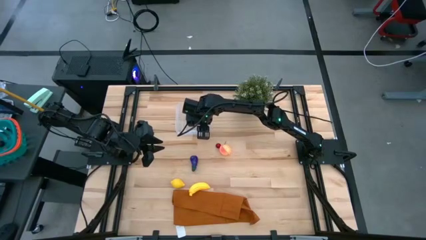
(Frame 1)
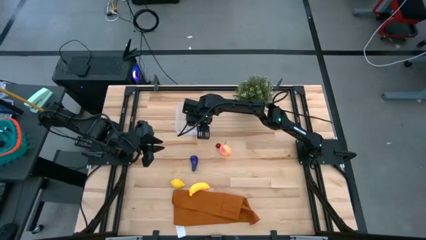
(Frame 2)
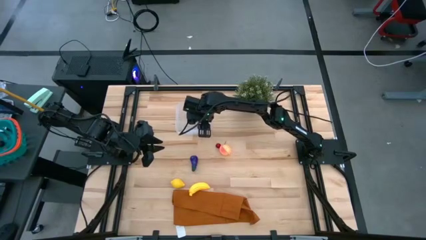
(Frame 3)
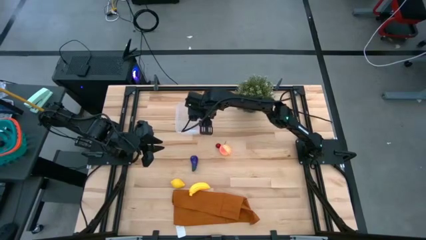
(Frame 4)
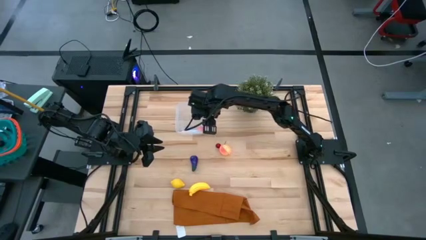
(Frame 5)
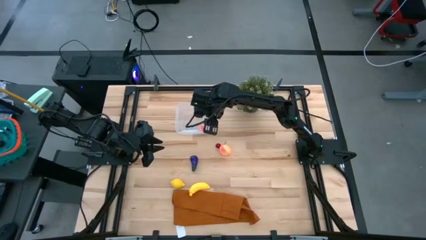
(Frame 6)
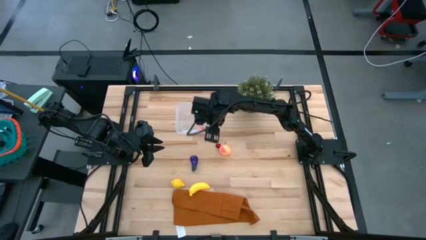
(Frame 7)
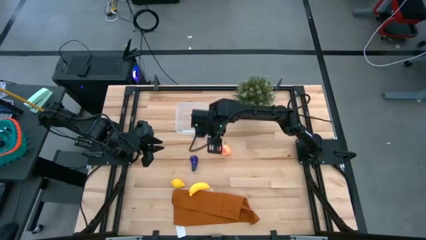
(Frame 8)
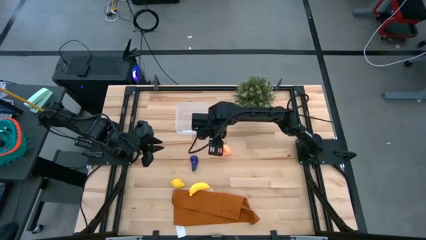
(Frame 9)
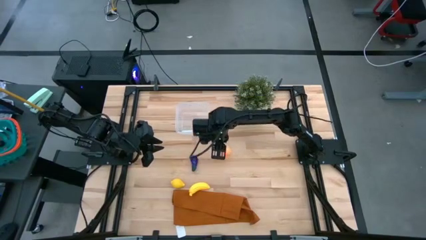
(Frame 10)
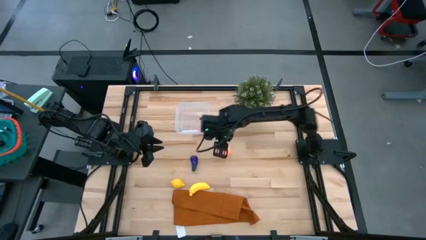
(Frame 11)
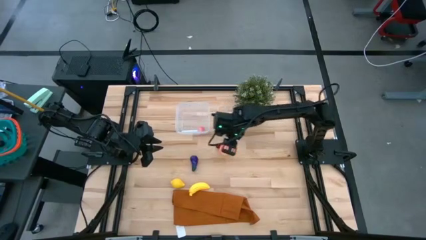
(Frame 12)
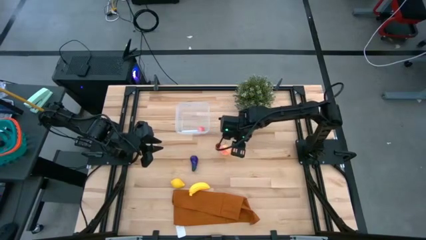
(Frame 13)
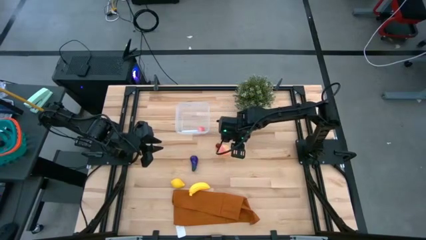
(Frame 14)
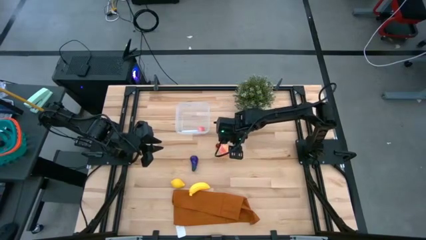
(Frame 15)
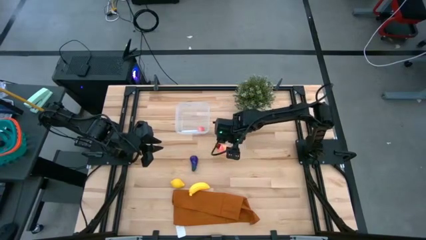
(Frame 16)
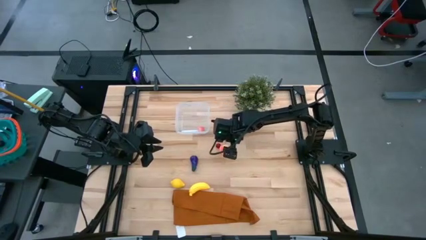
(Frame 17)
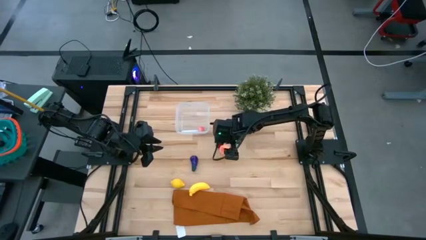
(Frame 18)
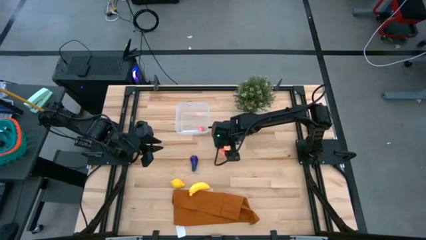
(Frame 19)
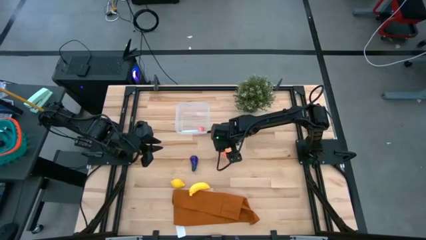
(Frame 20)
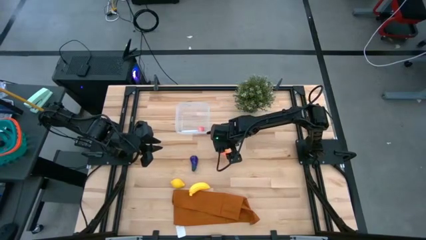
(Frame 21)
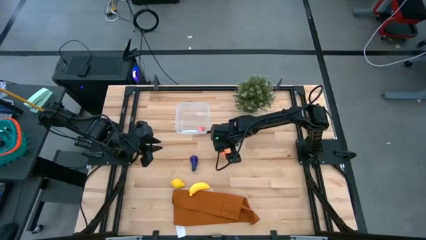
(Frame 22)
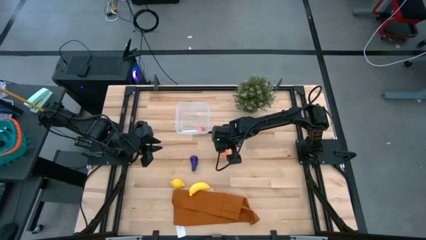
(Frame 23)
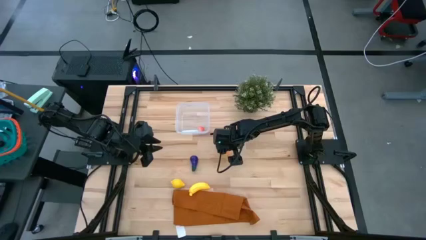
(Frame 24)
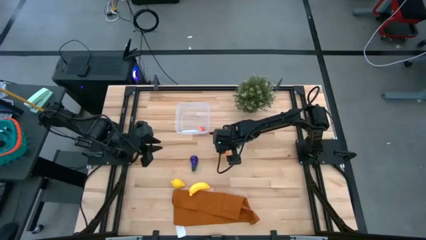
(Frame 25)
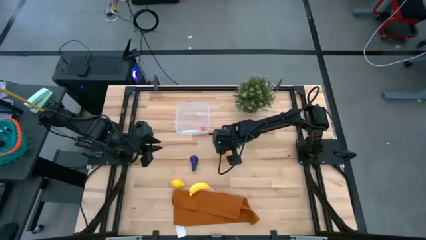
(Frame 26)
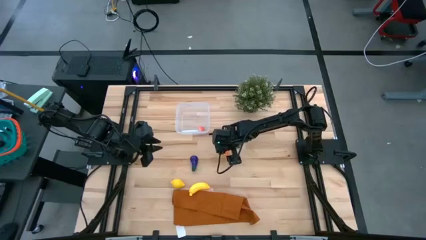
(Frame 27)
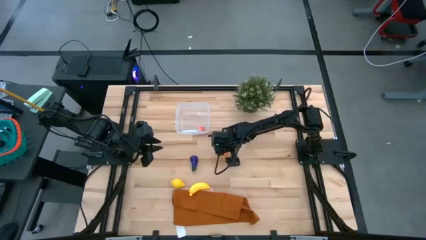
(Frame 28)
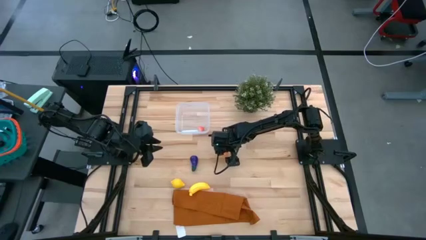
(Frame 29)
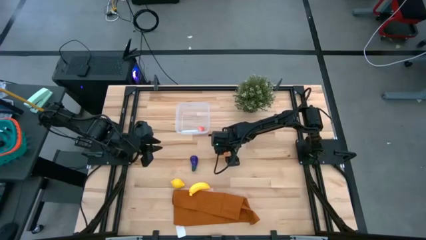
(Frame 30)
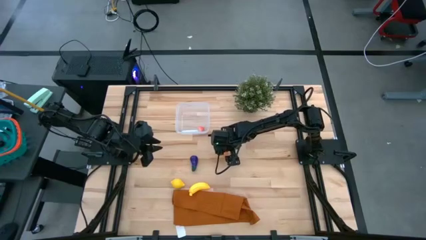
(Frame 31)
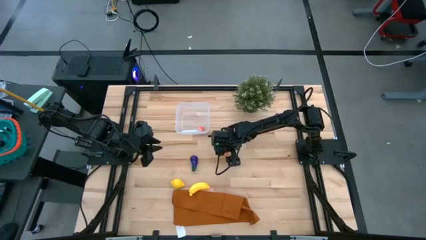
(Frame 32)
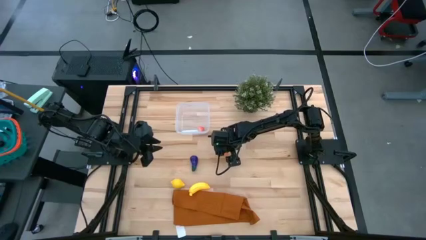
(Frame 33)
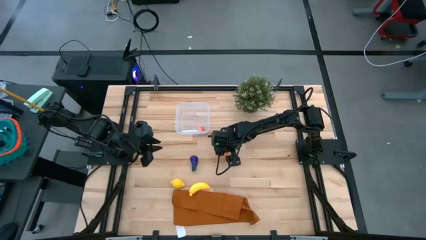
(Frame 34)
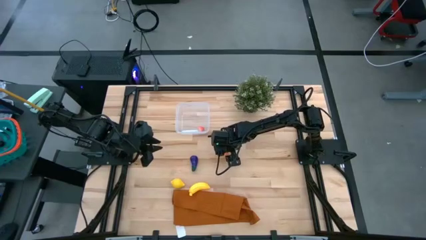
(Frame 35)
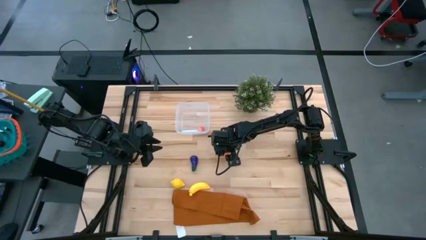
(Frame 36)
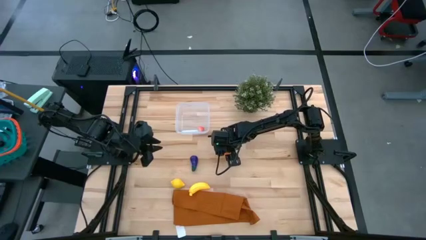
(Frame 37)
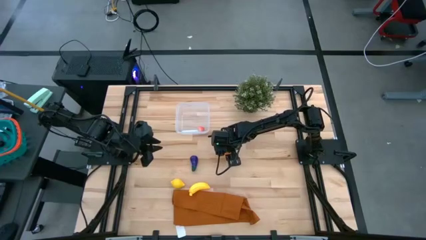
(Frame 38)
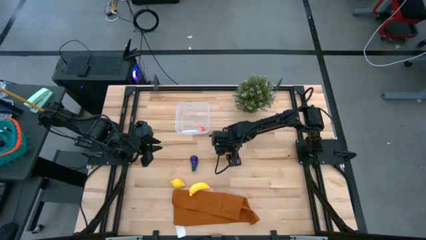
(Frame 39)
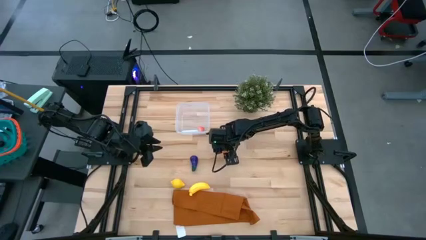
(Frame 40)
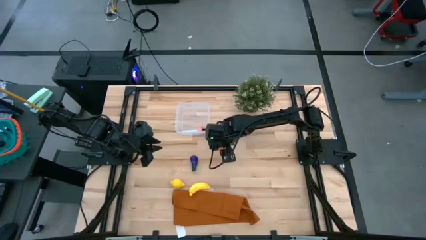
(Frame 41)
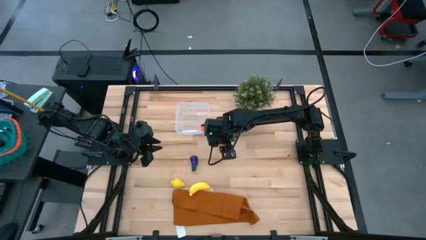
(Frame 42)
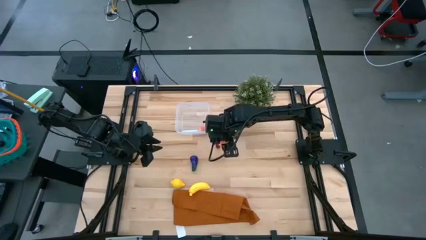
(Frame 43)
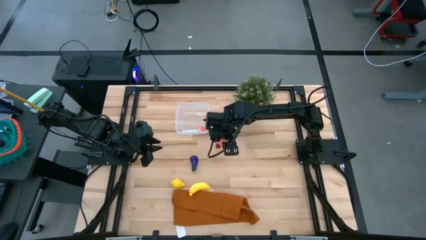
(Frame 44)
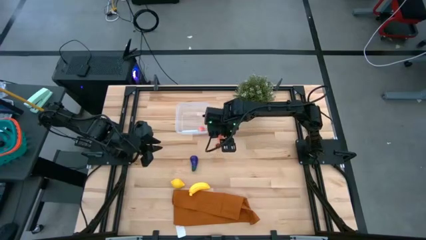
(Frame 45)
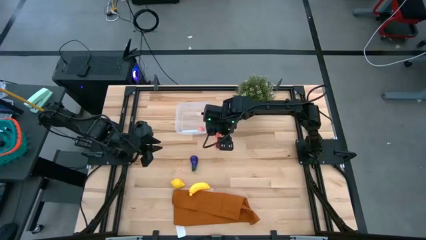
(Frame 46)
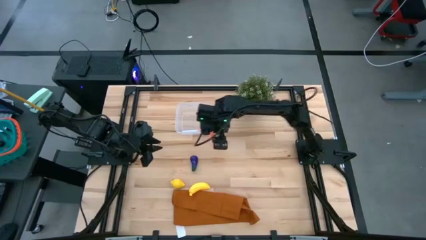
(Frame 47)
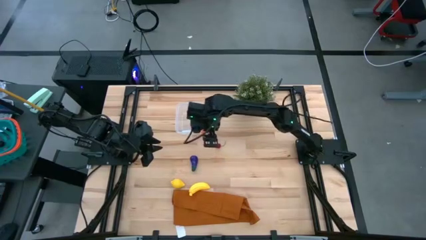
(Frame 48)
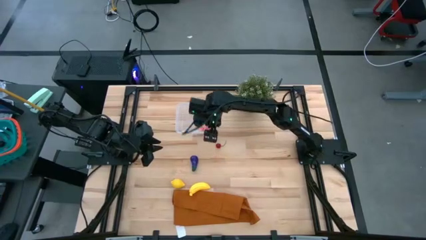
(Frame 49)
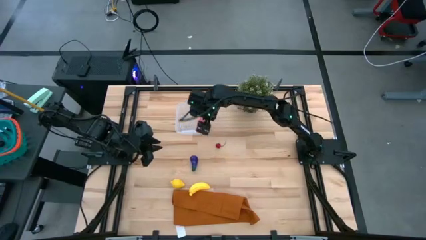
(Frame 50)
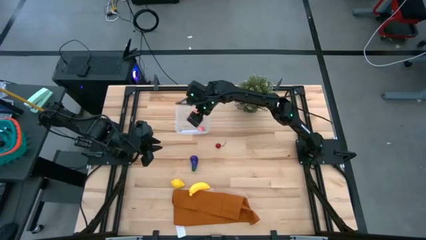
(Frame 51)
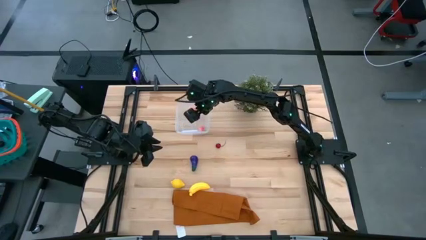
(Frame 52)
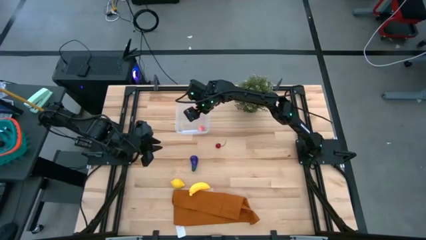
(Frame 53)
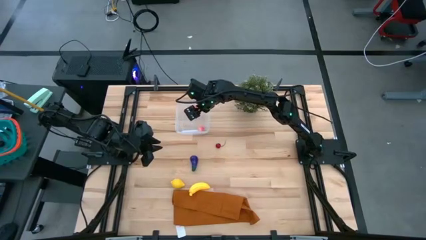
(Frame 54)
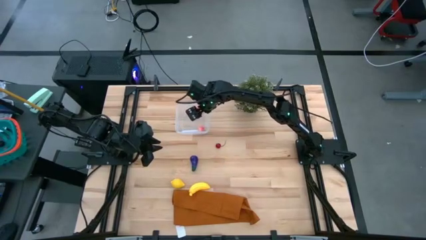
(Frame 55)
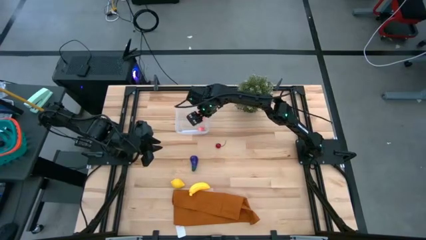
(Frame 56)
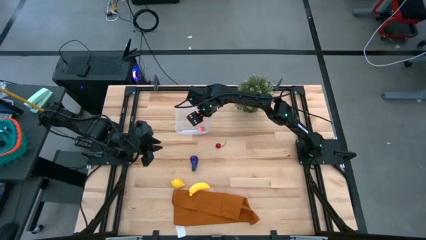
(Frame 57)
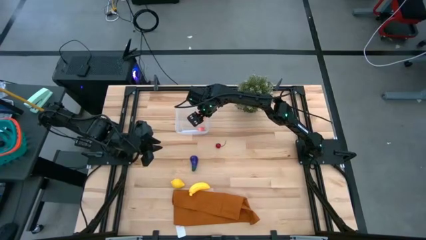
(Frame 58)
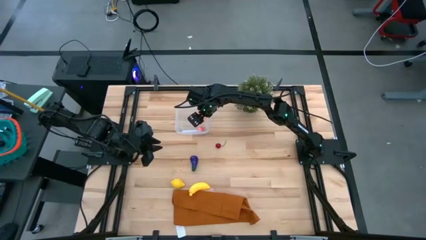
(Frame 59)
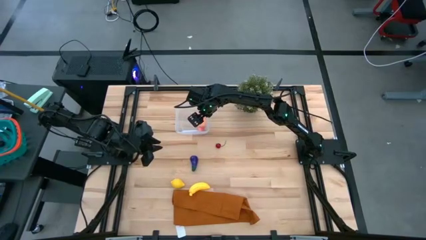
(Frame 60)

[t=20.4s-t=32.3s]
Task: Pick and placing Produce into tupperware
Put the peach into the container

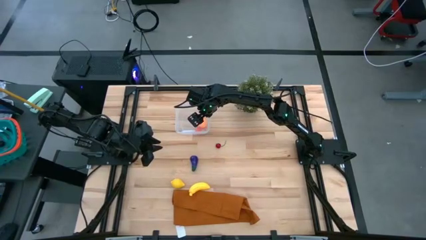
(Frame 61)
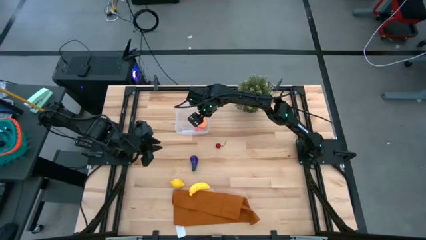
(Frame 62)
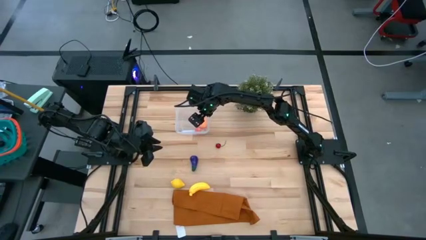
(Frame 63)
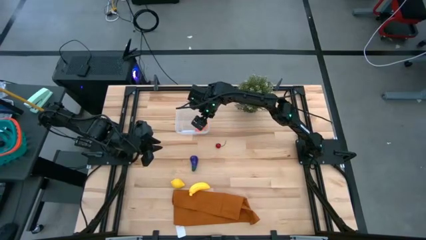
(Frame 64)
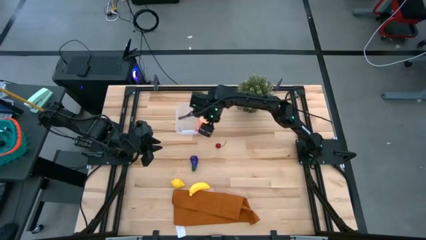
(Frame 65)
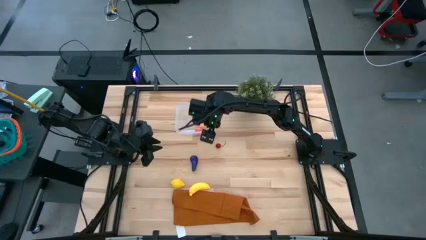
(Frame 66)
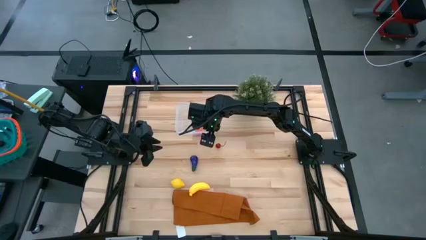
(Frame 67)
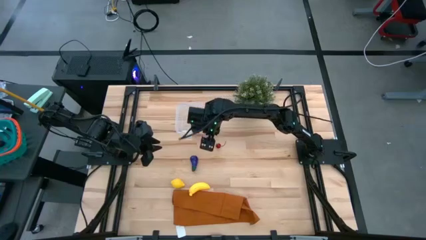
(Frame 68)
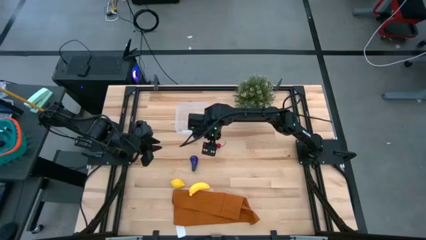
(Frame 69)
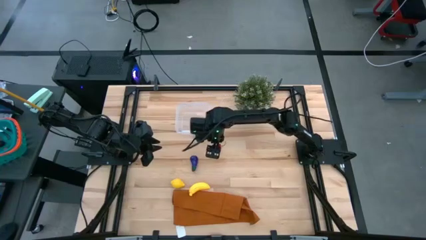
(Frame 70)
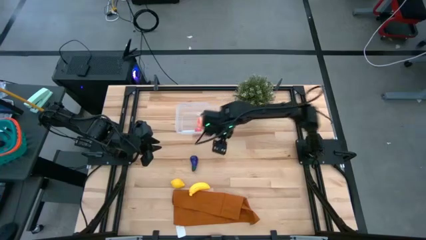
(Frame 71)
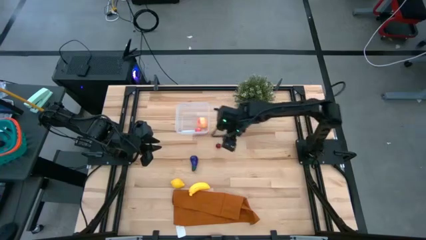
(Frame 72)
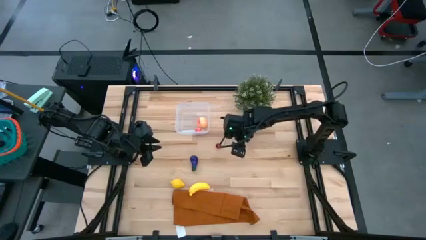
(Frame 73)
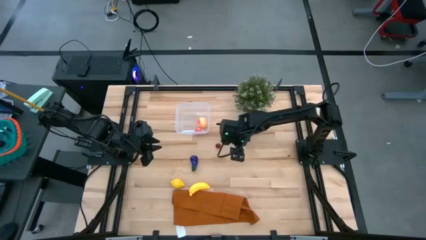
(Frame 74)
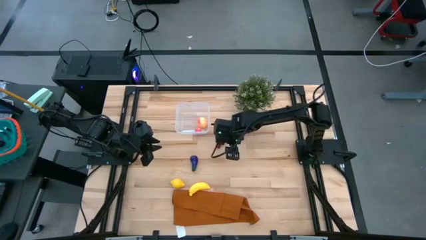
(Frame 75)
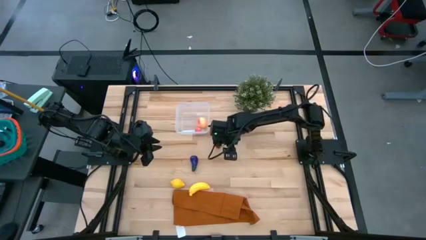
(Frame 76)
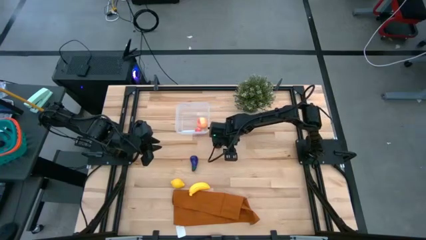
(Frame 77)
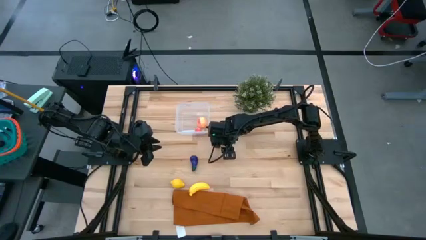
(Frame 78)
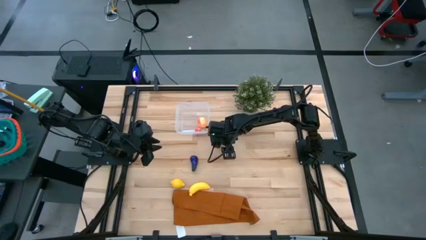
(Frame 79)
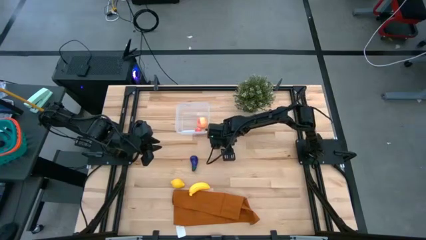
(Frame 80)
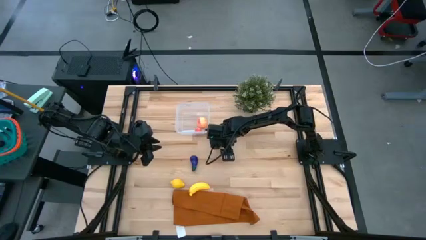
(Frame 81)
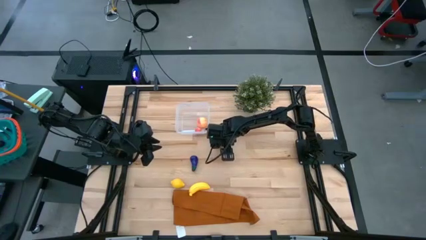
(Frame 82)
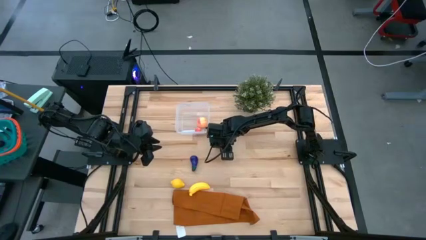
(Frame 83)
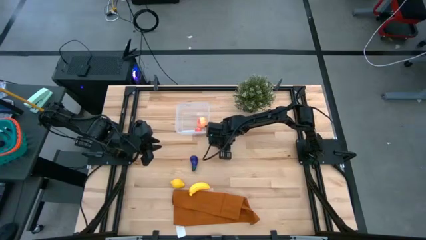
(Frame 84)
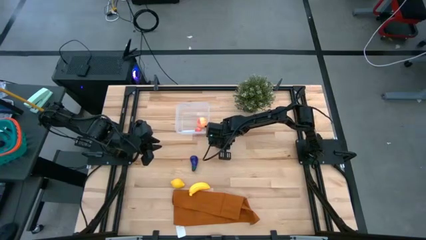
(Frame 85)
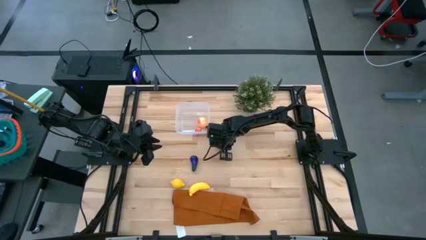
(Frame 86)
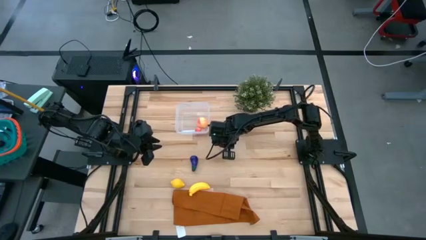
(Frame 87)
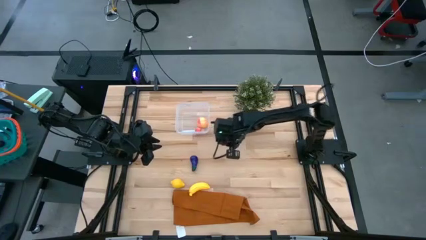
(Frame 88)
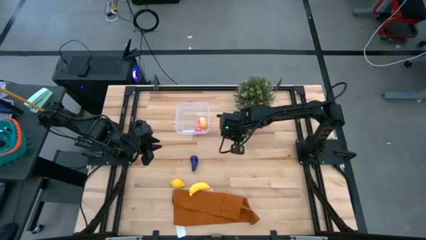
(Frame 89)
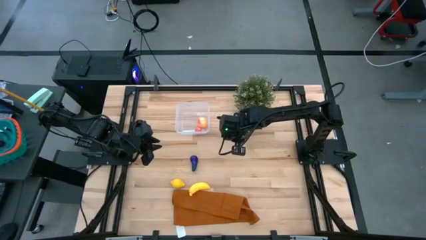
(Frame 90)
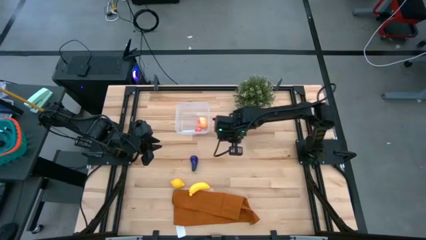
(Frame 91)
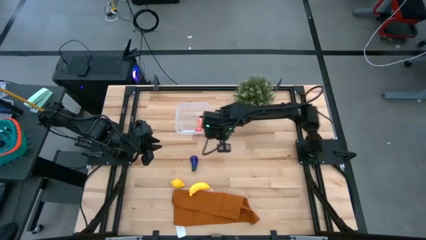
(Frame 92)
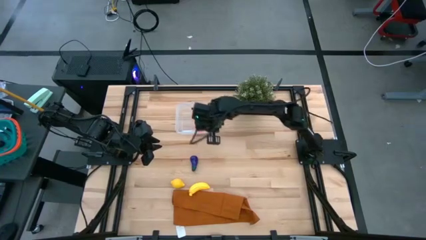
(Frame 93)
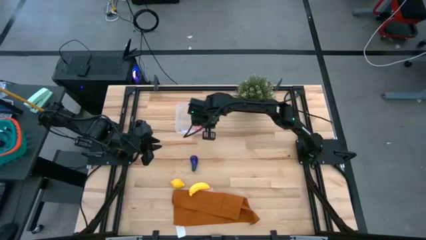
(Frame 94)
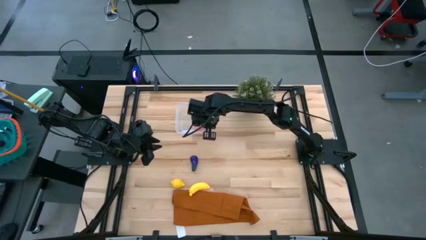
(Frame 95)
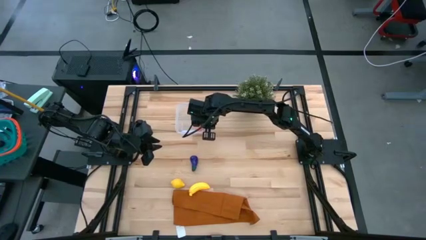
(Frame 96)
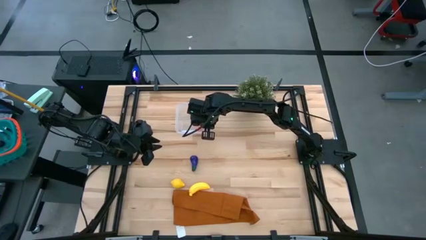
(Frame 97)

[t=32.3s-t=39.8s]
Put the cherry into the container
